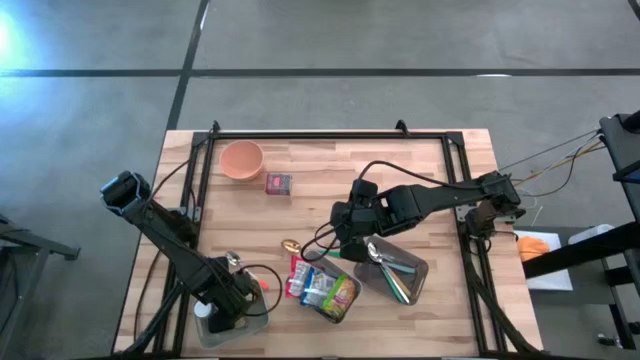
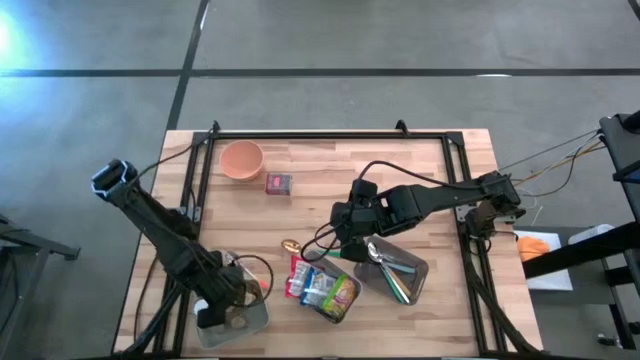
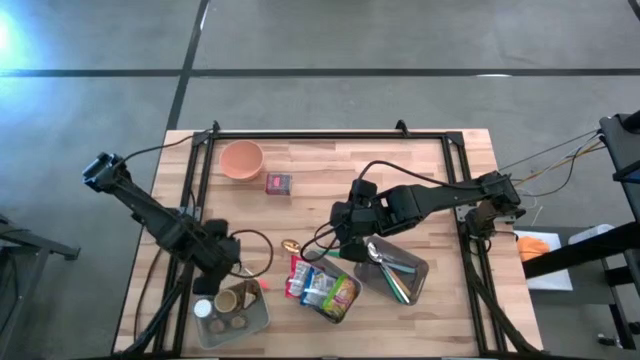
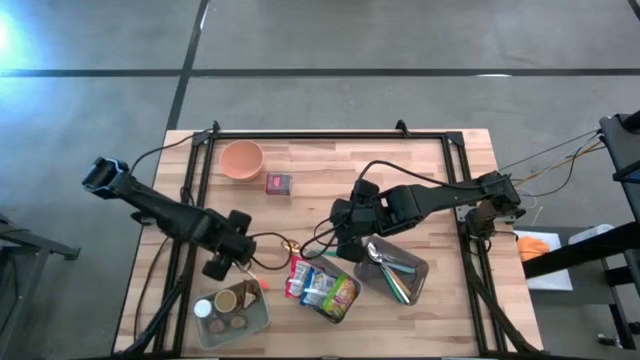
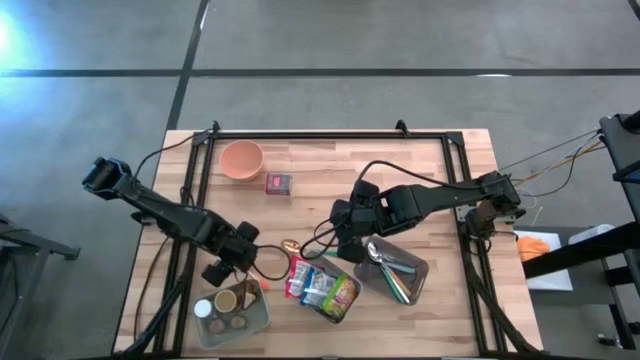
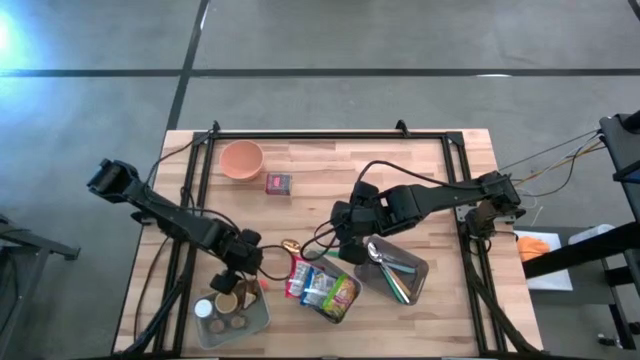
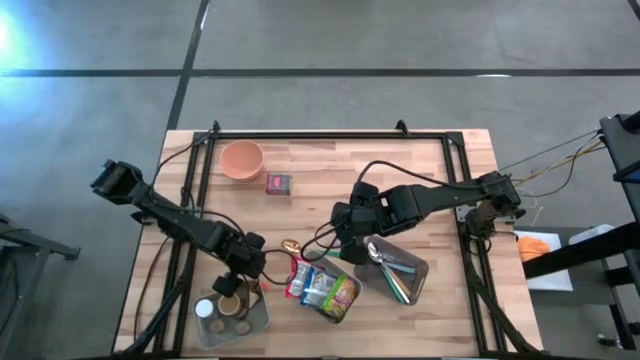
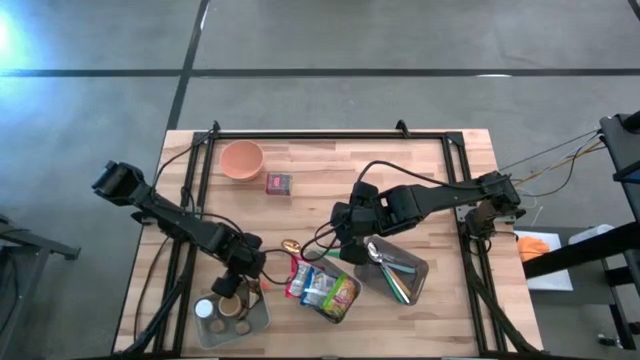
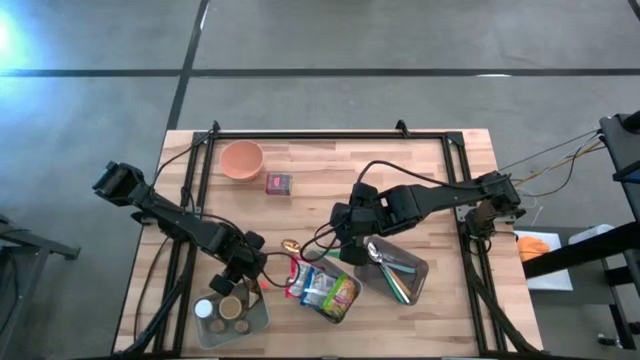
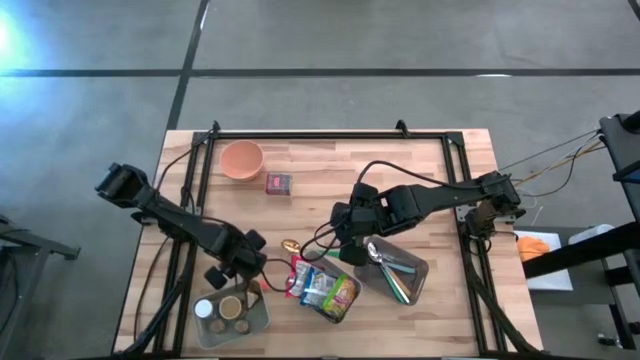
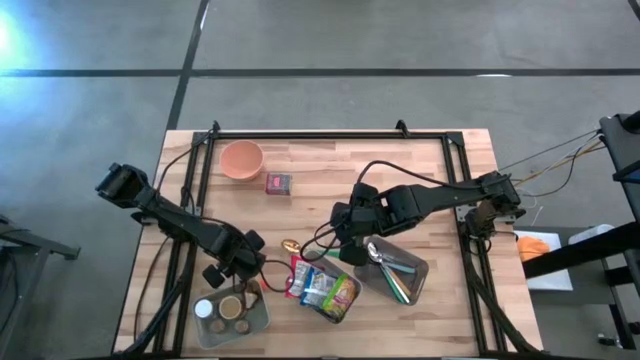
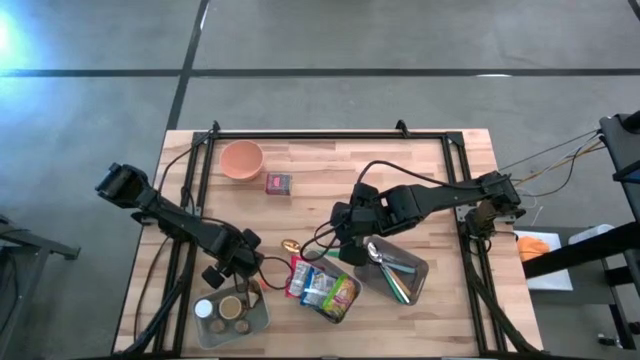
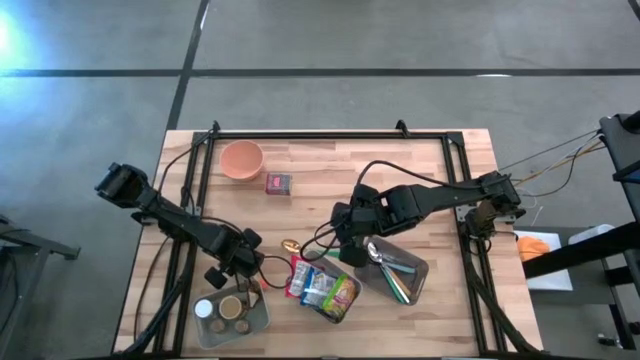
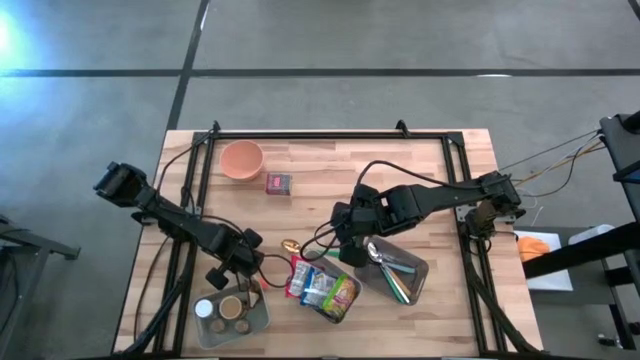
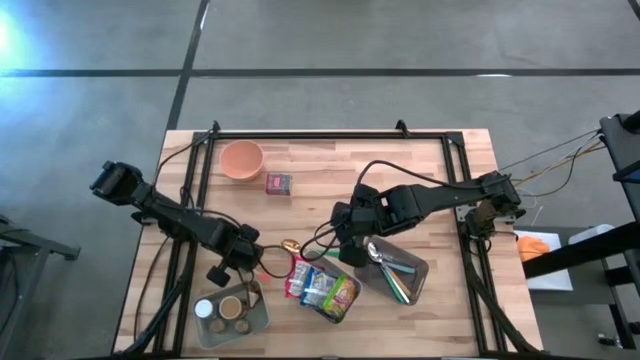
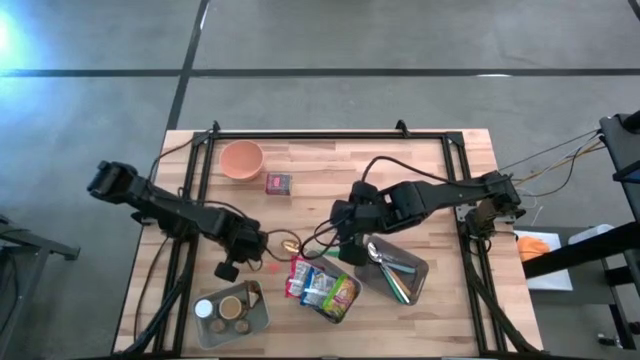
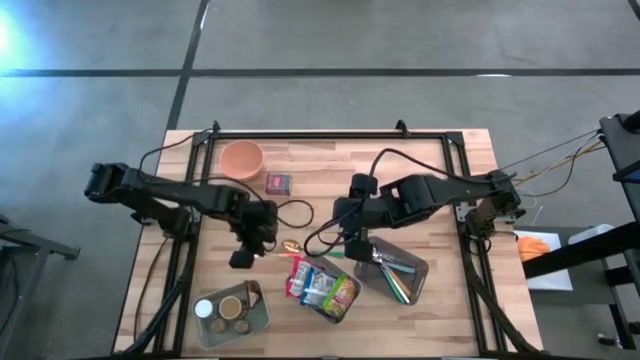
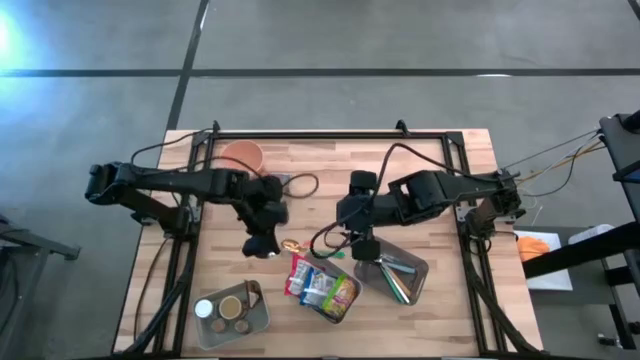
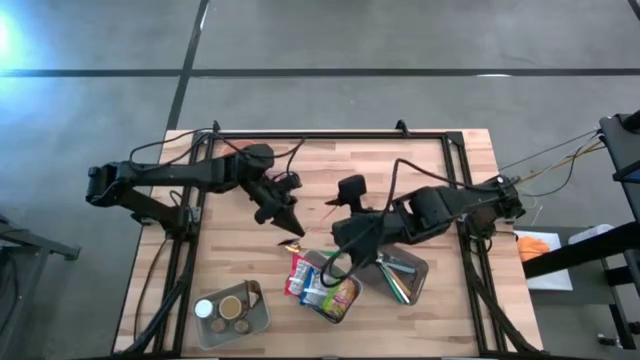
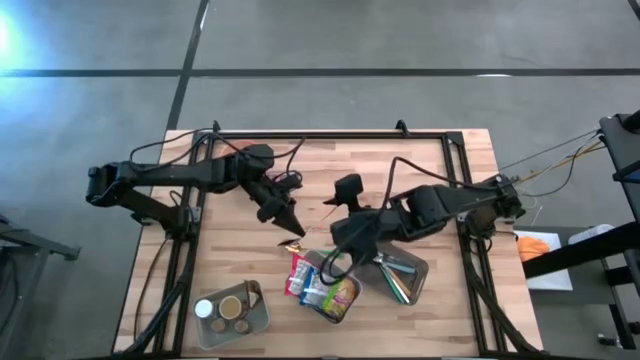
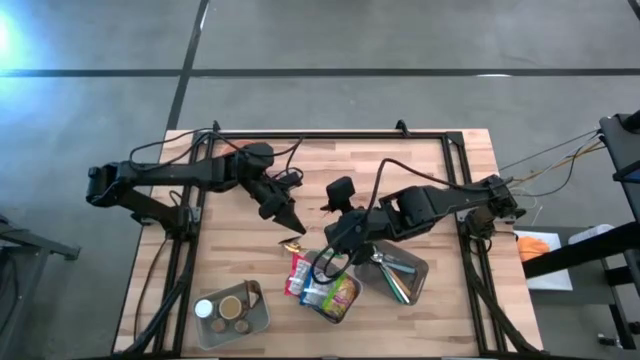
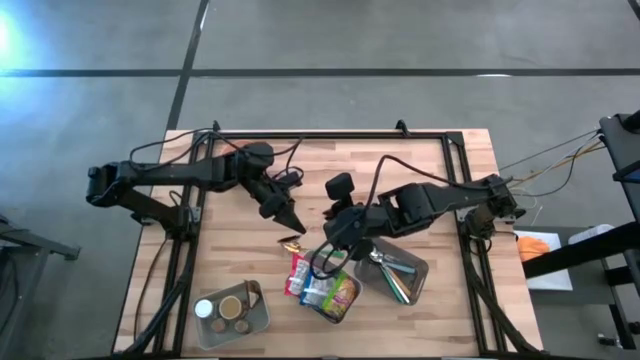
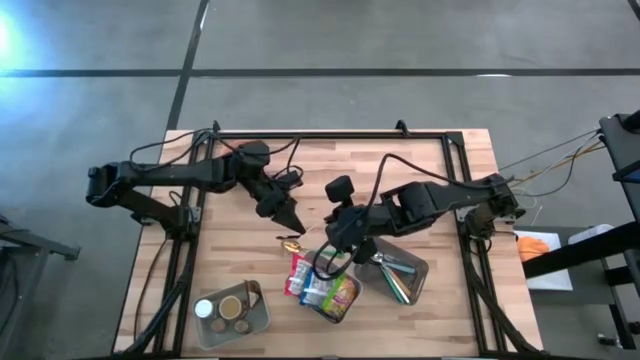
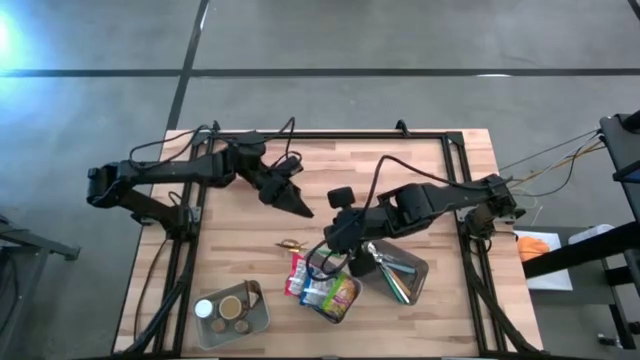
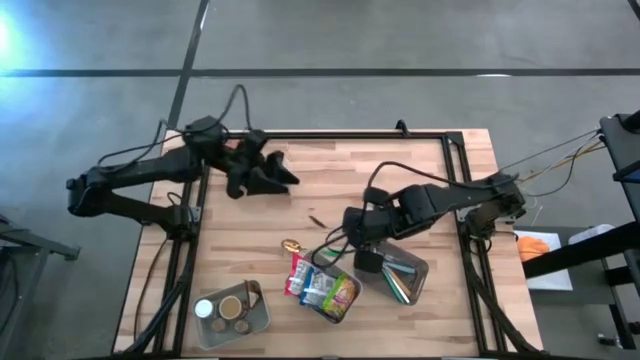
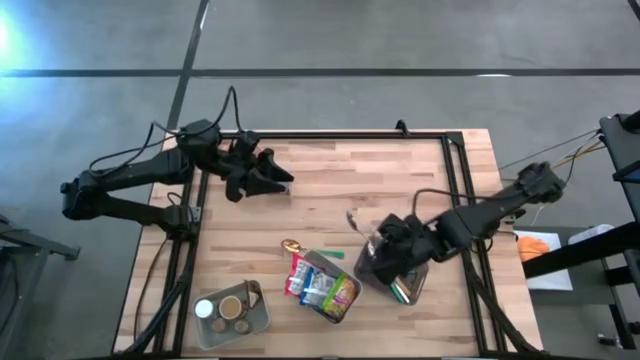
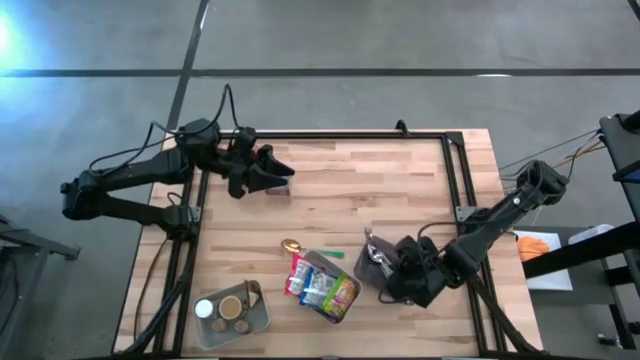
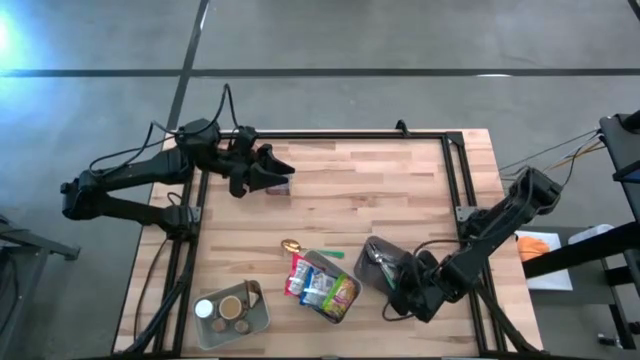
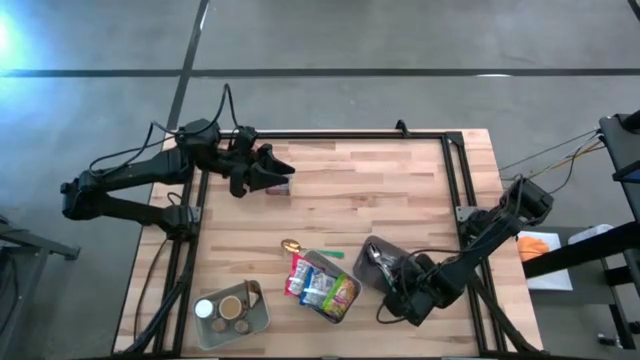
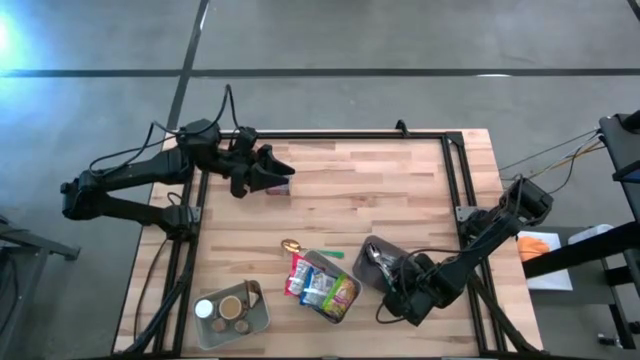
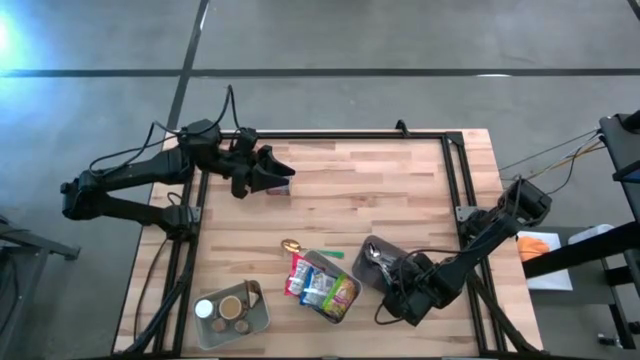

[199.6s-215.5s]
Put the orange spoon into the black bin

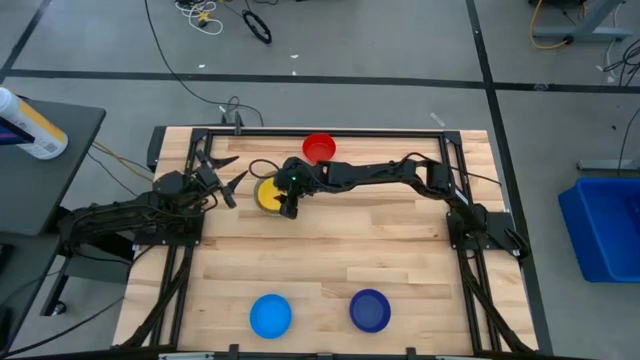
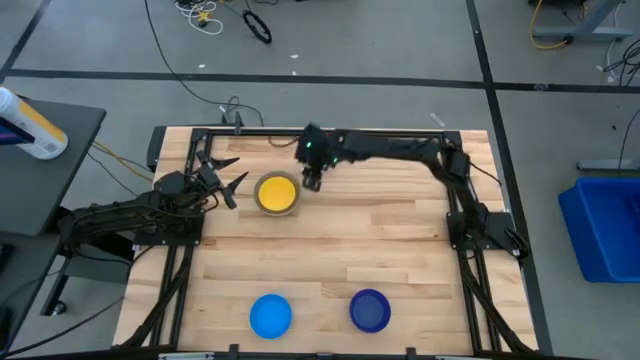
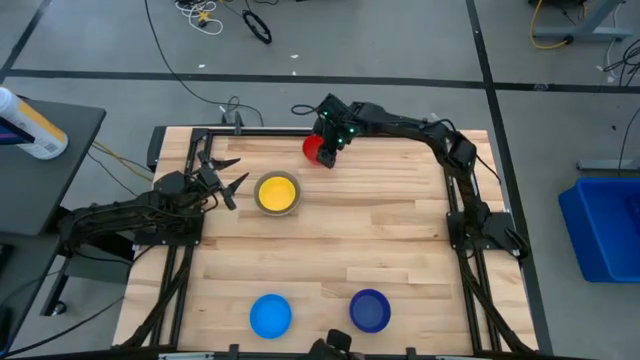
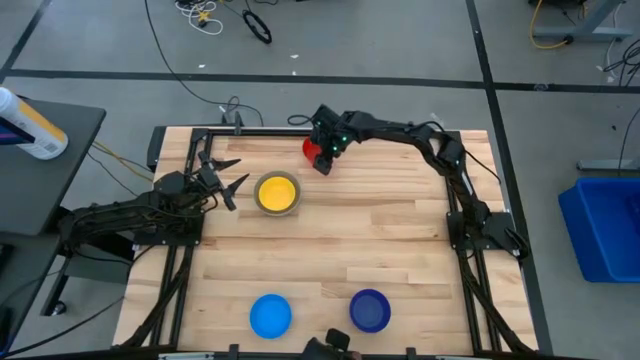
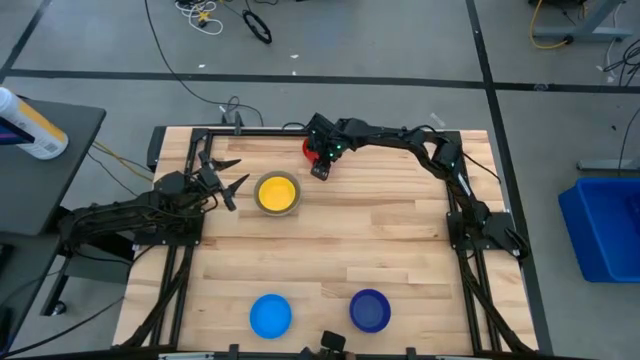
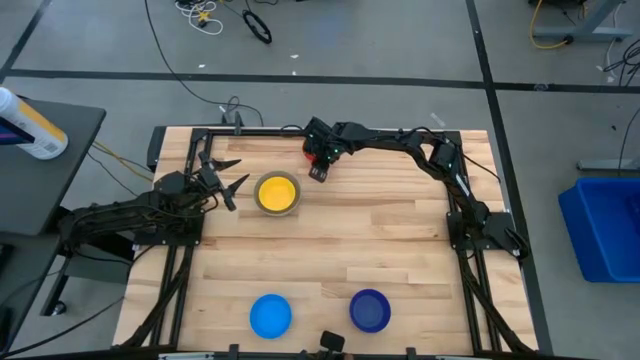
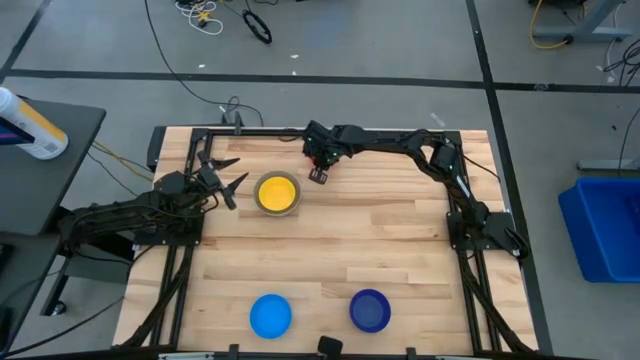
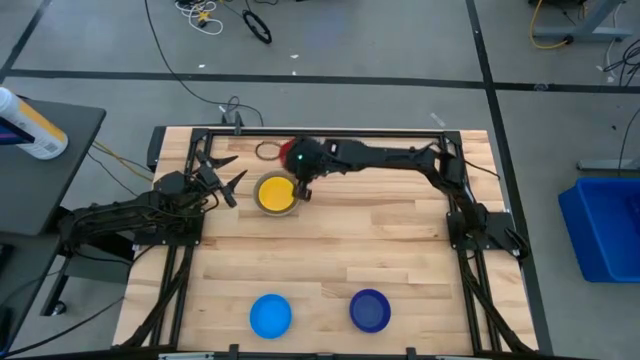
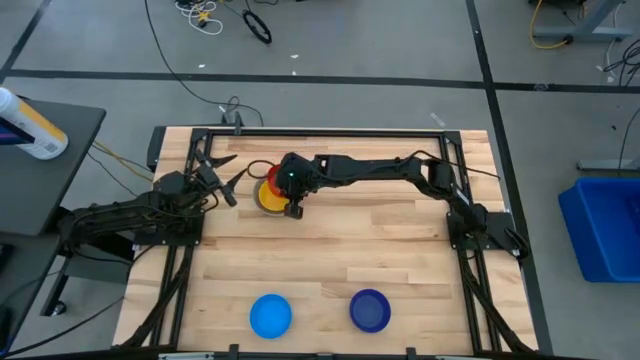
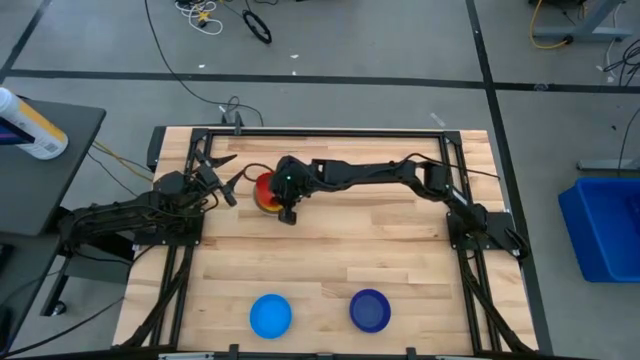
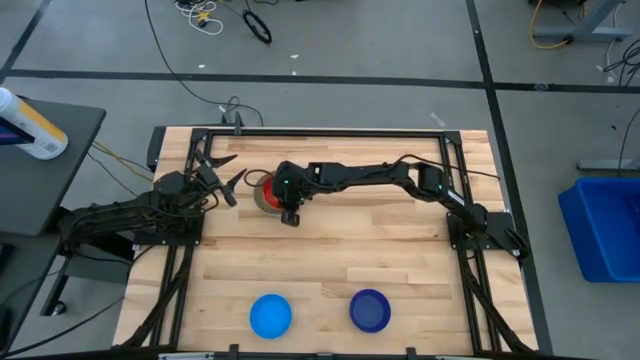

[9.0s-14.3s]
Stack the red bowl on the yellow bowl
